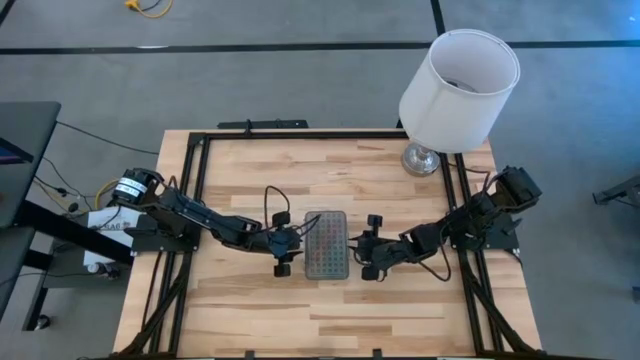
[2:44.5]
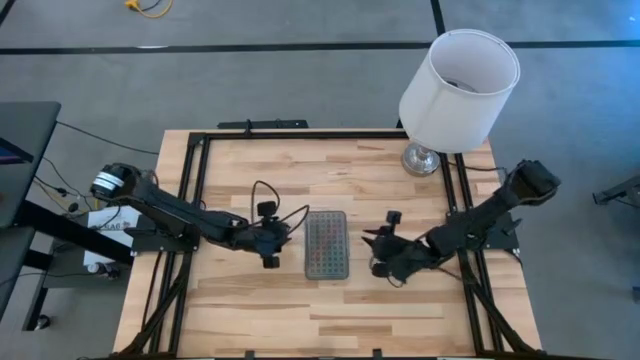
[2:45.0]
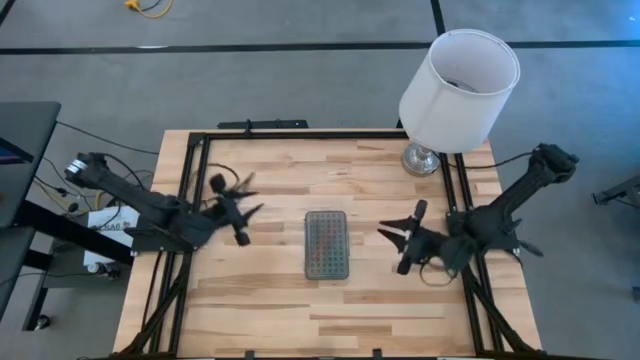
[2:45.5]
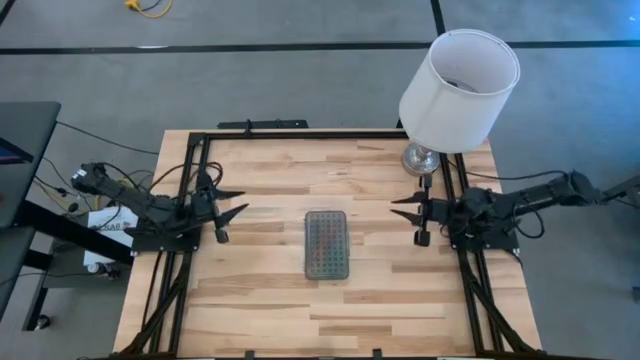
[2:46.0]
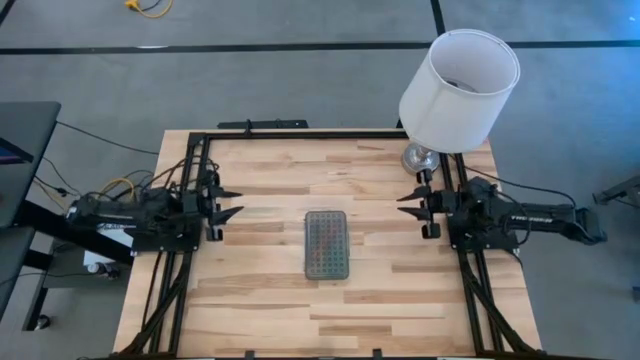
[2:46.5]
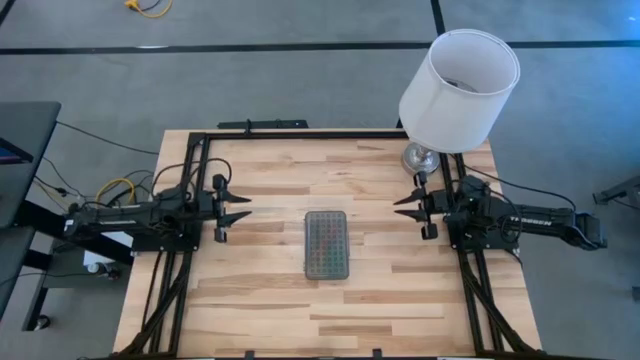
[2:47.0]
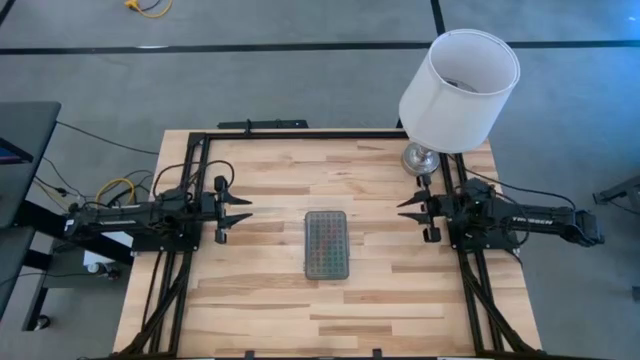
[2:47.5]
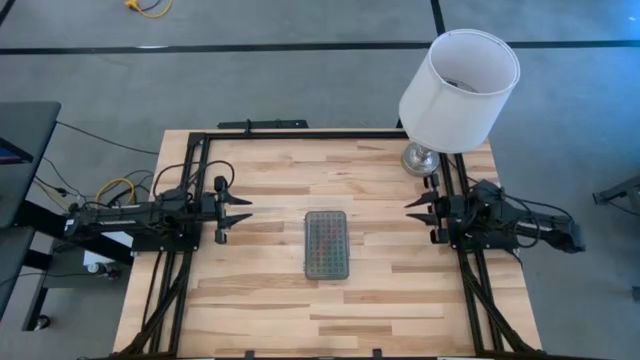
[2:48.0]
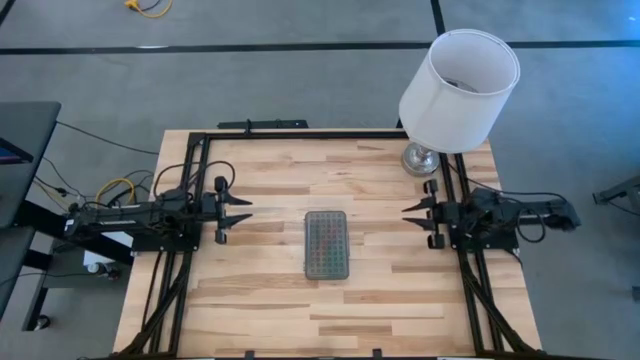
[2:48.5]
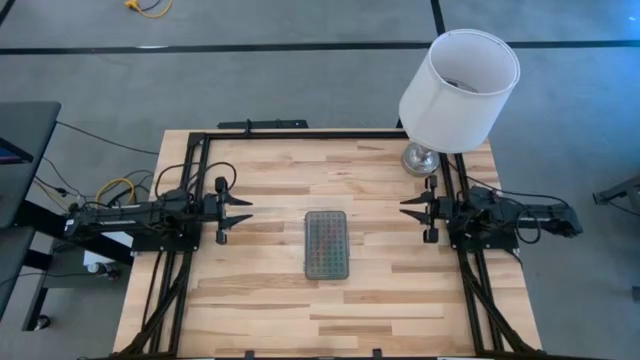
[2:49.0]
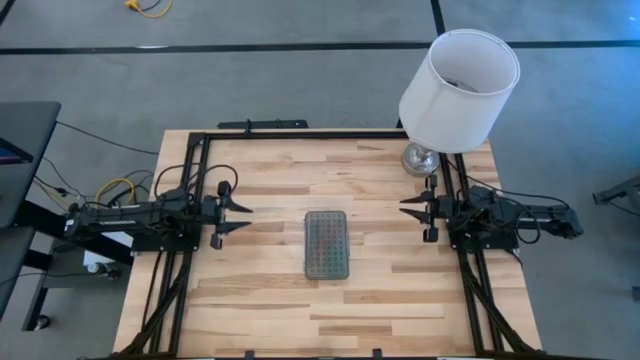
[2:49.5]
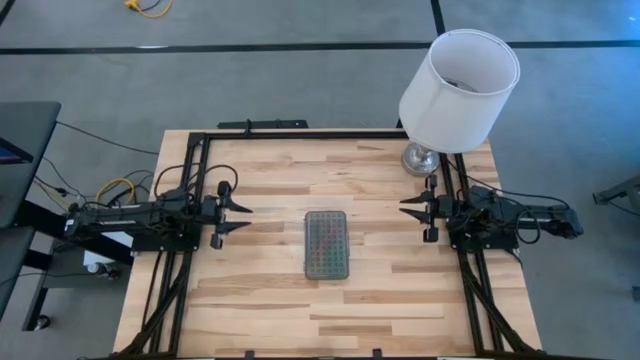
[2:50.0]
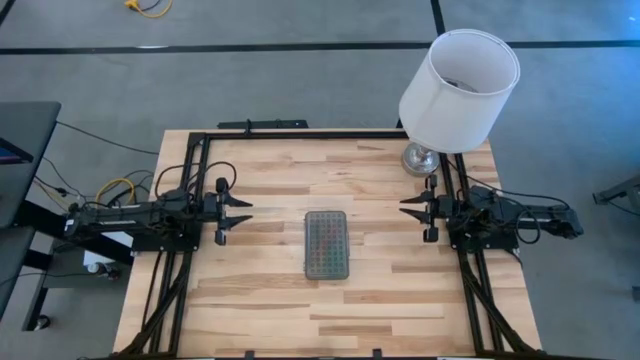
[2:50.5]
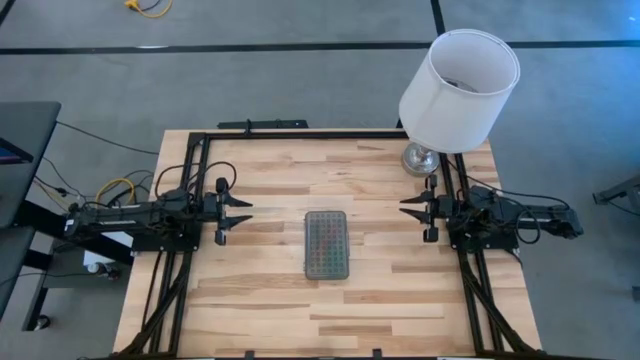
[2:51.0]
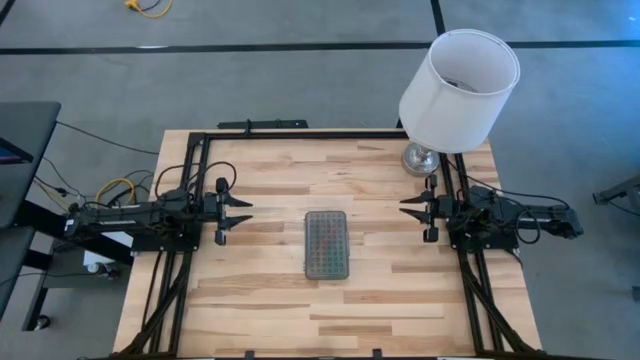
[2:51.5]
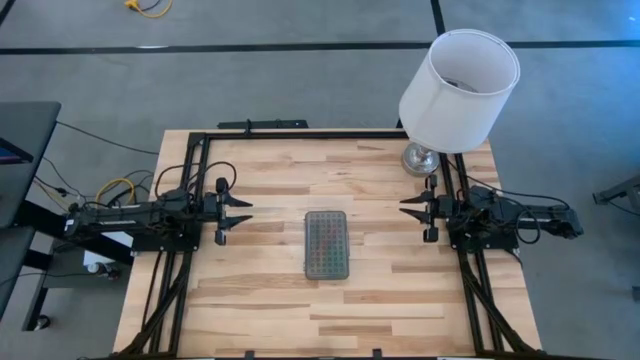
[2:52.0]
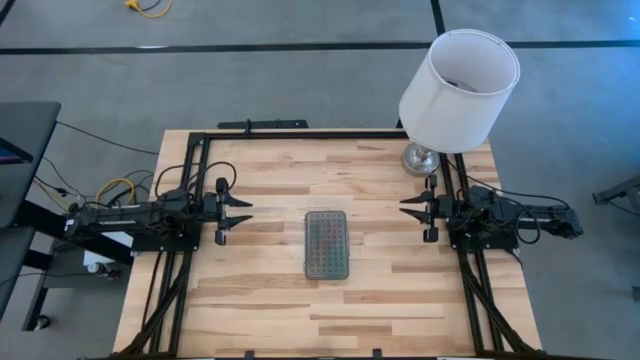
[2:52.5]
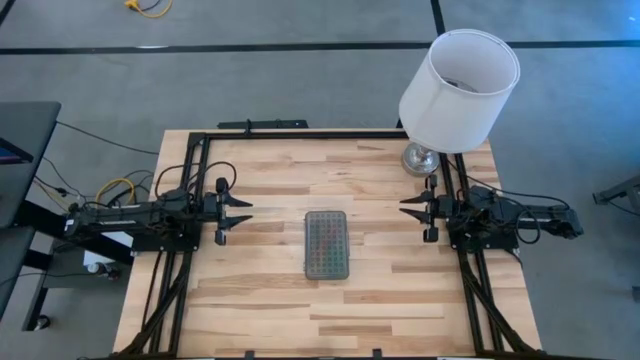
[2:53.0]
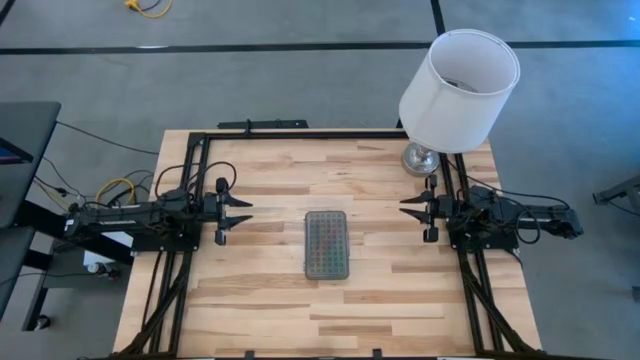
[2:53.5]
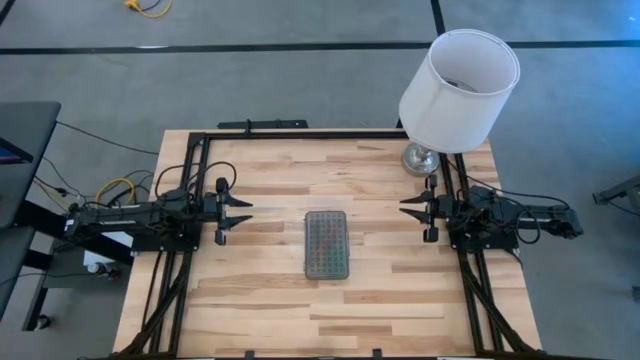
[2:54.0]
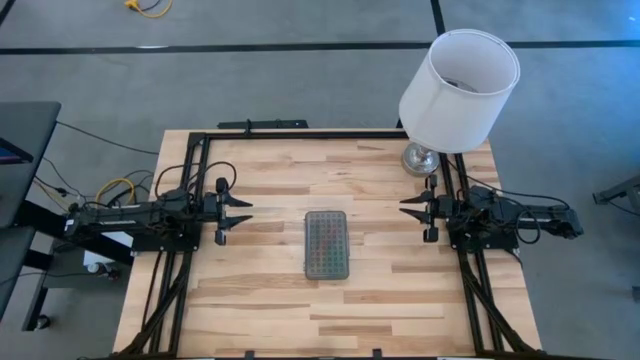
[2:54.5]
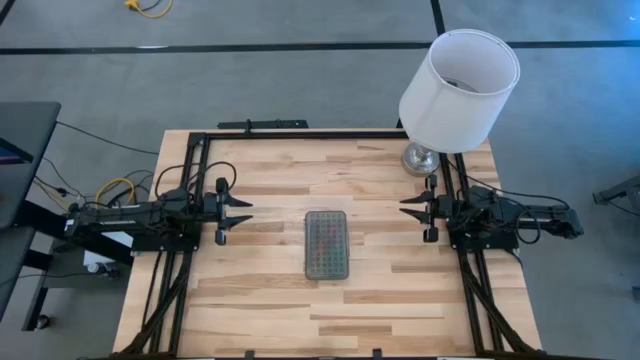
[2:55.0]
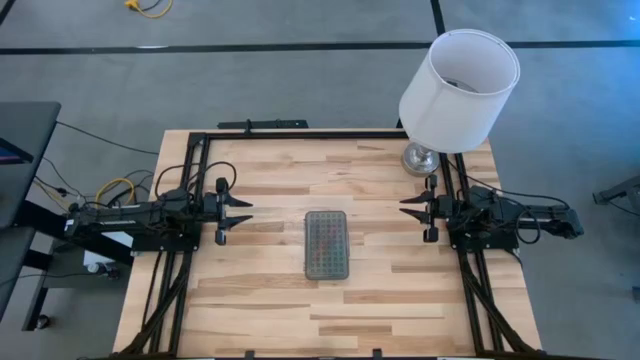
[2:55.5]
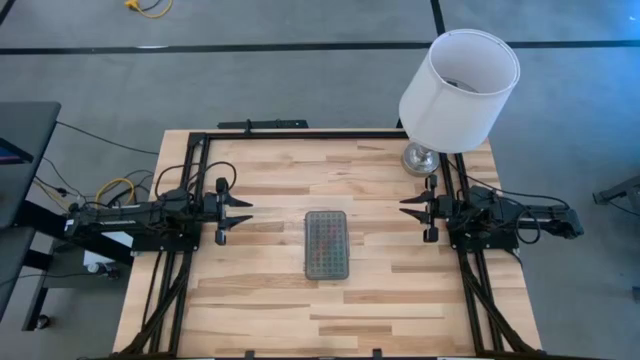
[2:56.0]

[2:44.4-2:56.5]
Task: Pick & place school supplies into a supply box
Return to Home Position

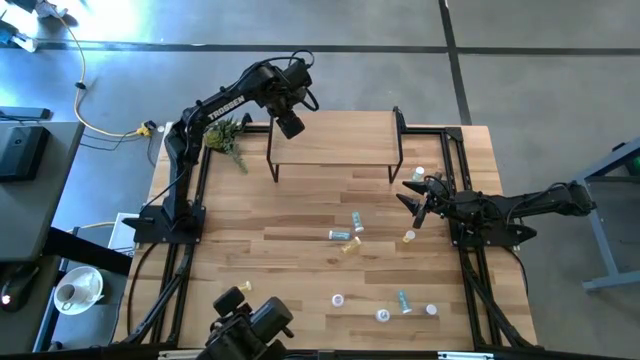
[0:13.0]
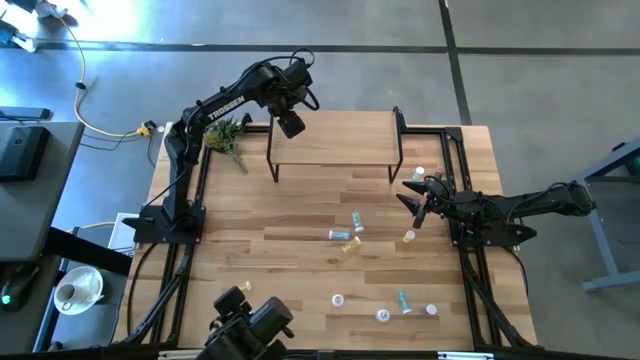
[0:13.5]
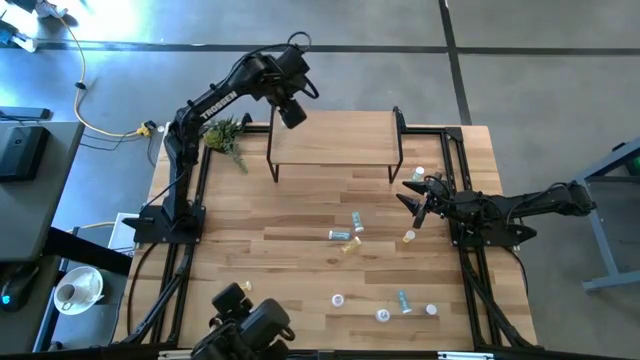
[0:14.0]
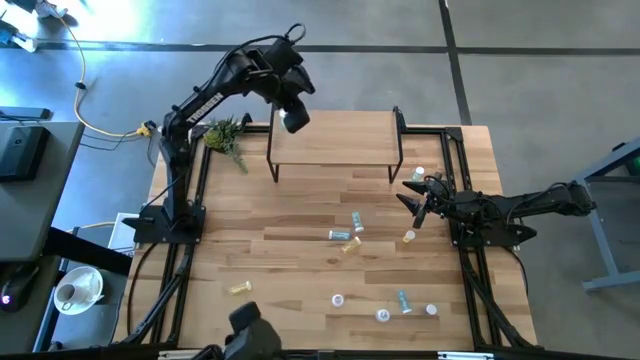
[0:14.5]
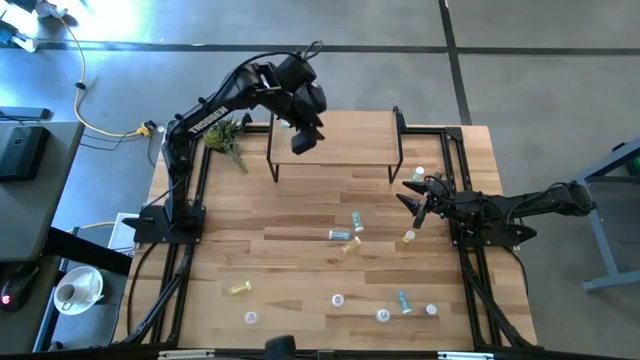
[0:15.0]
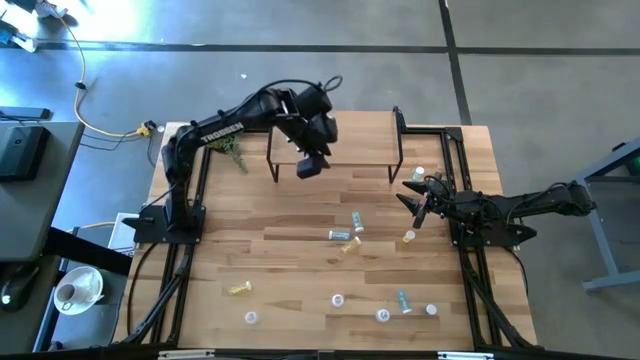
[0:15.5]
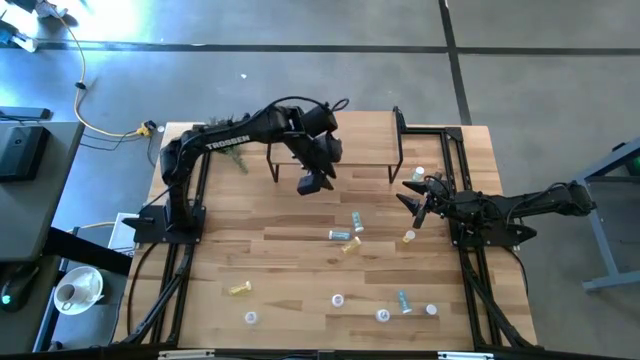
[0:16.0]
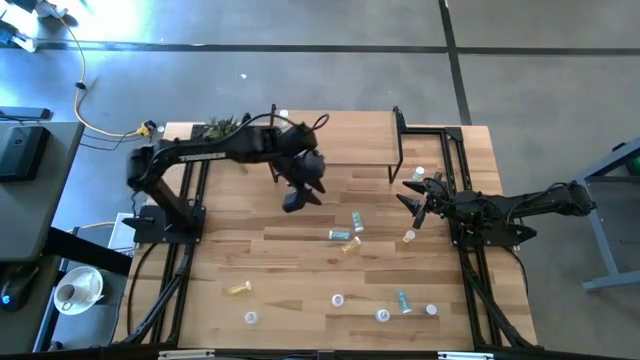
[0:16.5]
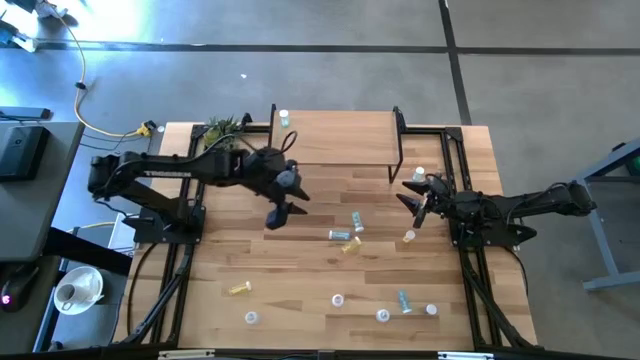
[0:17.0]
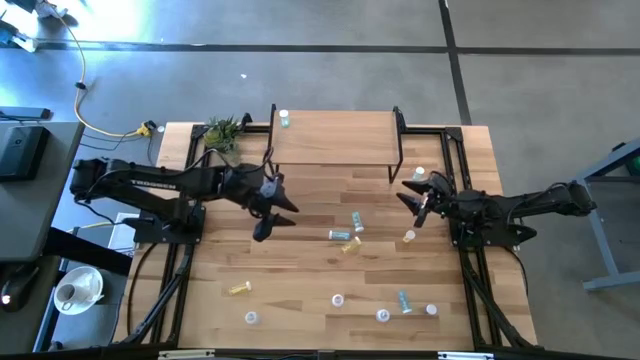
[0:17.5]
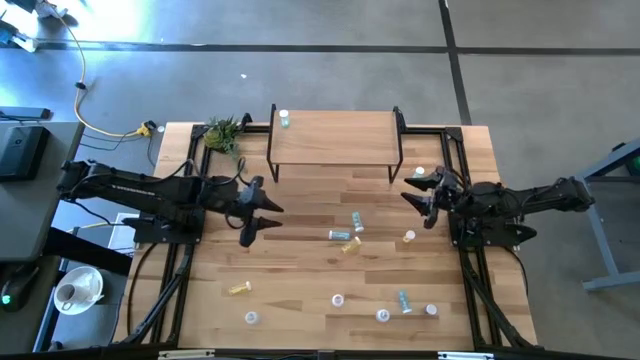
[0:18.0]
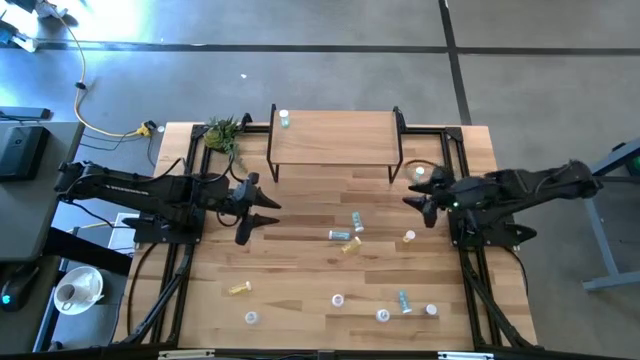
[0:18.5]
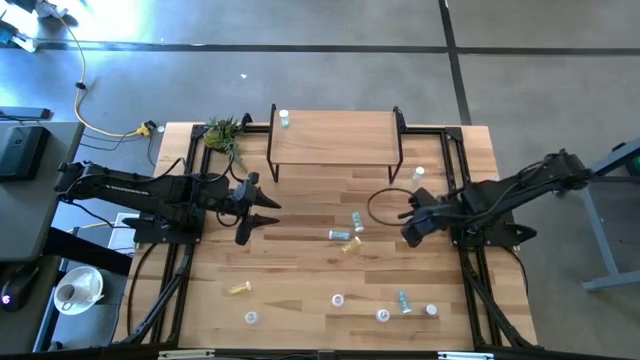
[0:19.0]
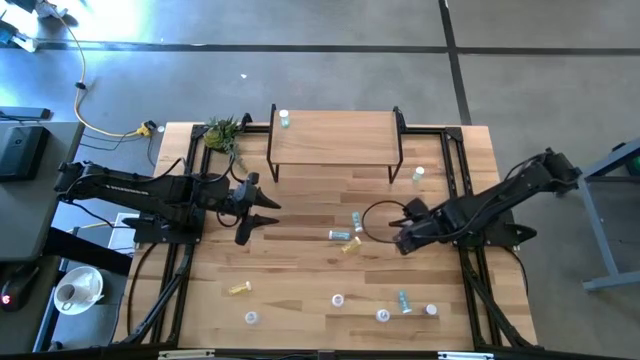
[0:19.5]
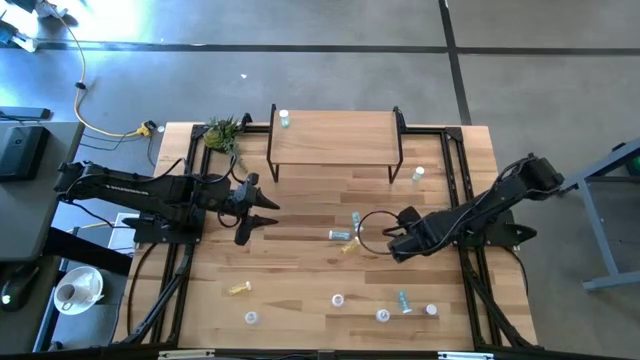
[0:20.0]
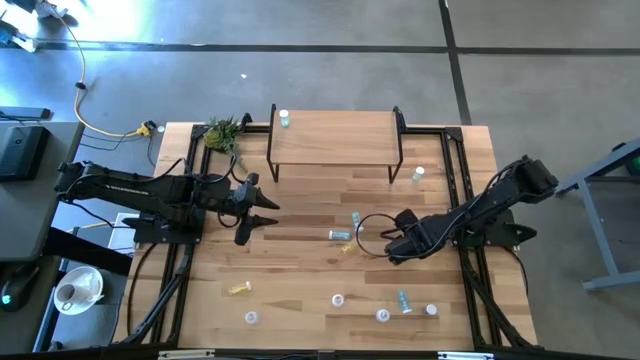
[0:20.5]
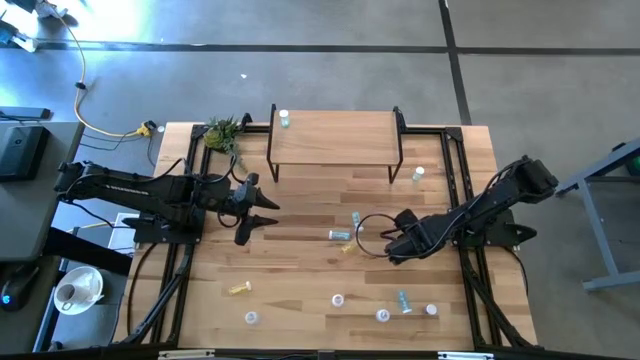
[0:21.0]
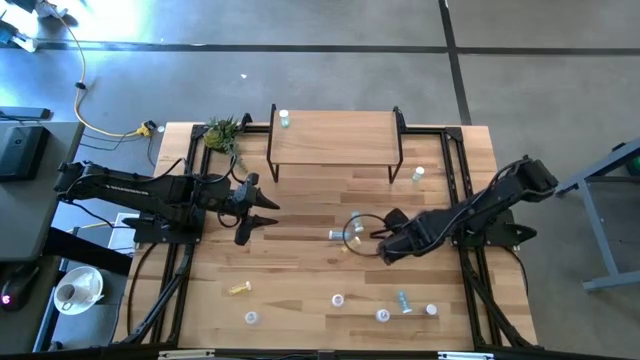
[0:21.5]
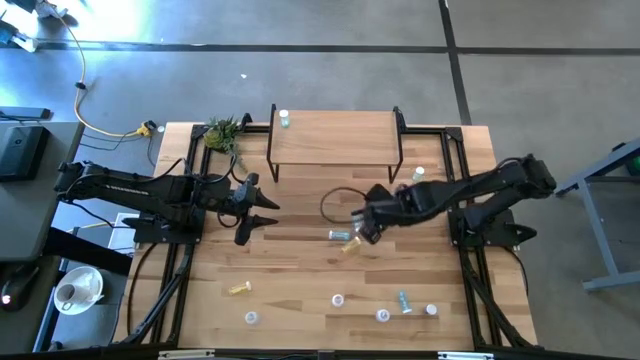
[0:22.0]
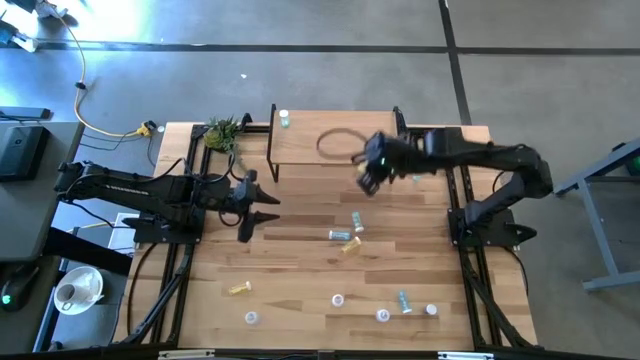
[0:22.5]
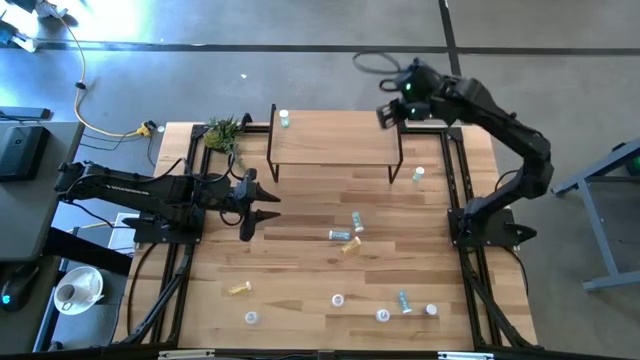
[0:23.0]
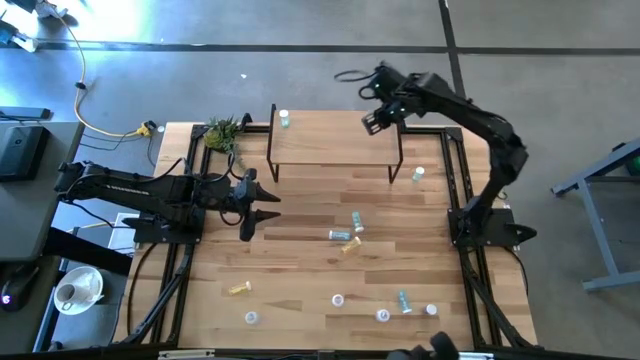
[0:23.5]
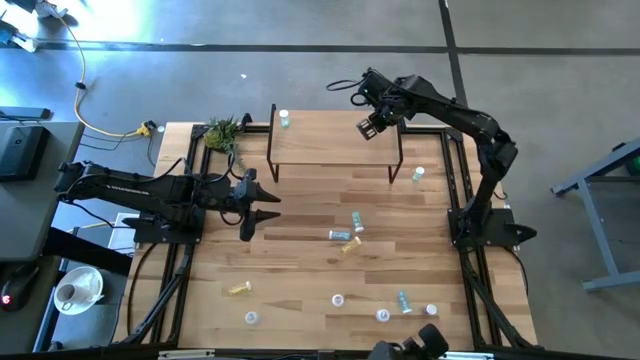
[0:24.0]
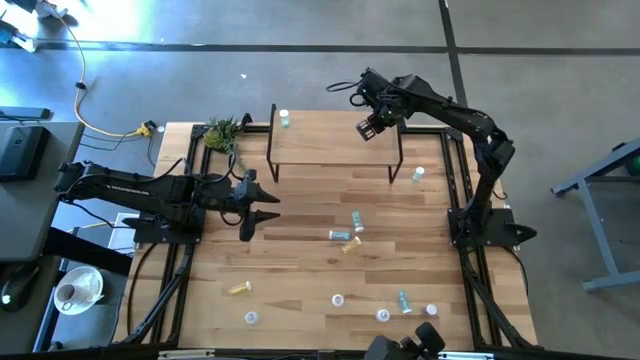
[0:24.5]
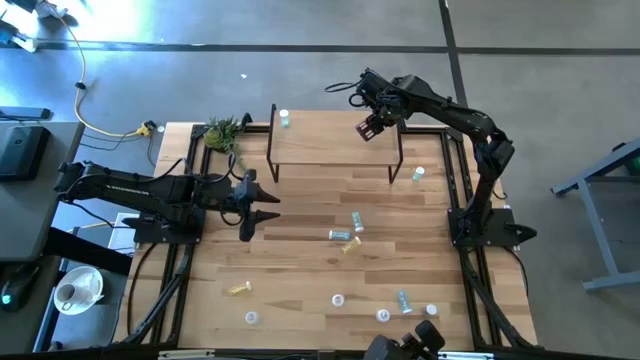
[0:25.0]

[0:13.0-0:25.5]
Task: Pick and place medicine bottles onto shelf by color
Put the top right yellow pill bottle on the shelf
